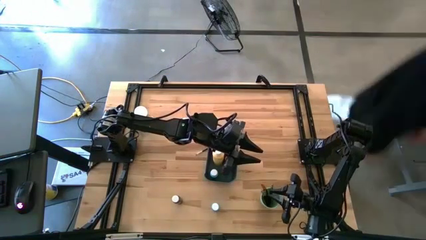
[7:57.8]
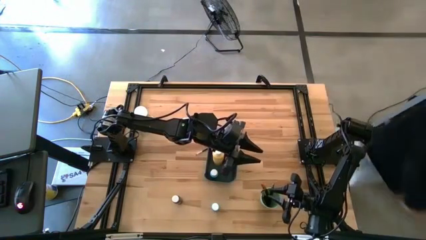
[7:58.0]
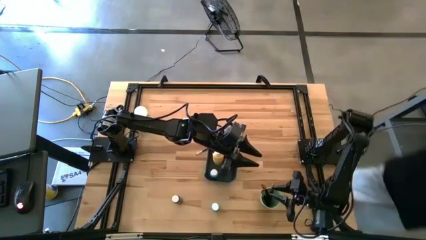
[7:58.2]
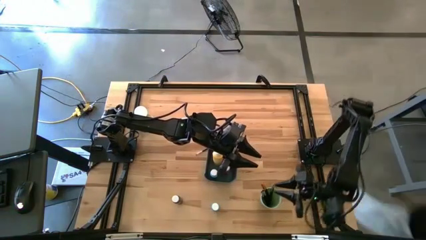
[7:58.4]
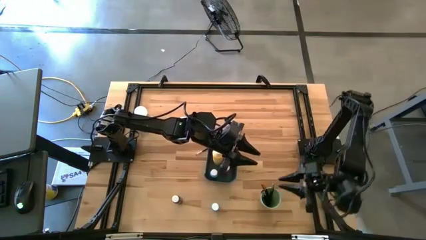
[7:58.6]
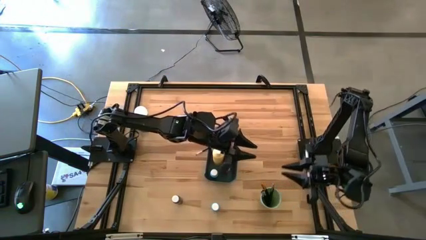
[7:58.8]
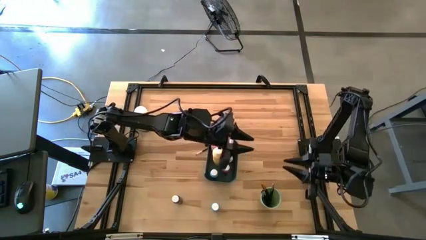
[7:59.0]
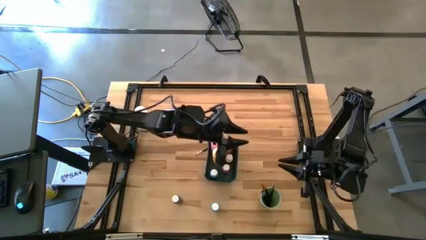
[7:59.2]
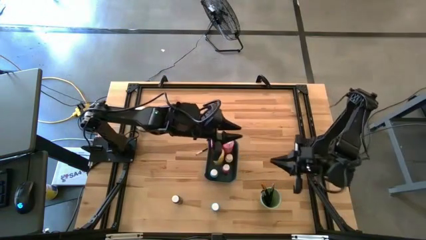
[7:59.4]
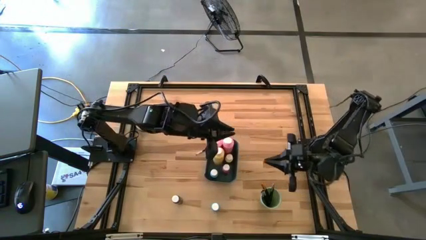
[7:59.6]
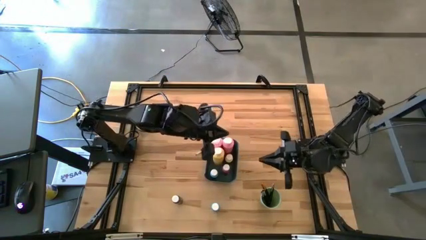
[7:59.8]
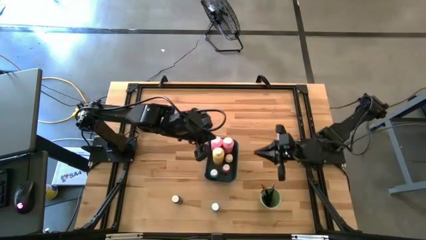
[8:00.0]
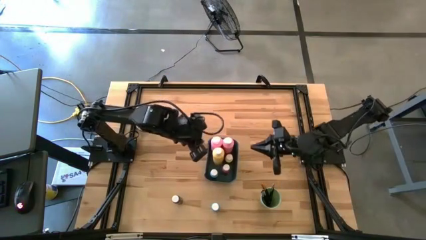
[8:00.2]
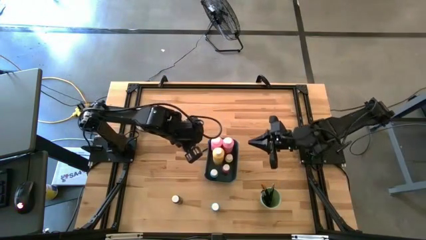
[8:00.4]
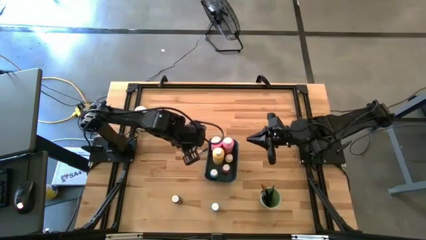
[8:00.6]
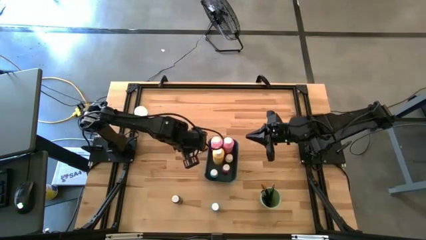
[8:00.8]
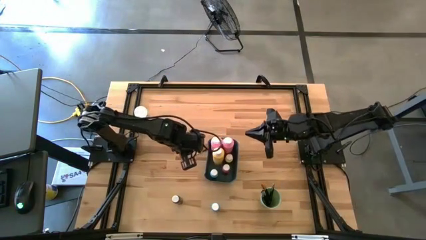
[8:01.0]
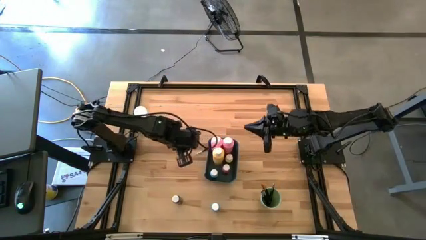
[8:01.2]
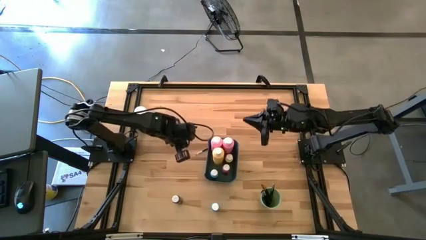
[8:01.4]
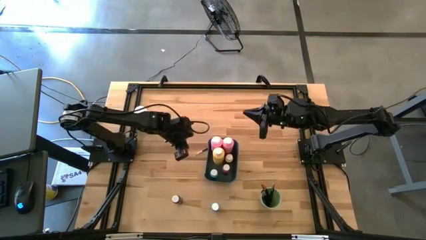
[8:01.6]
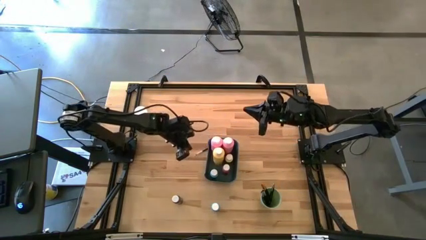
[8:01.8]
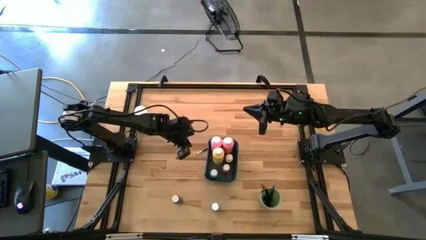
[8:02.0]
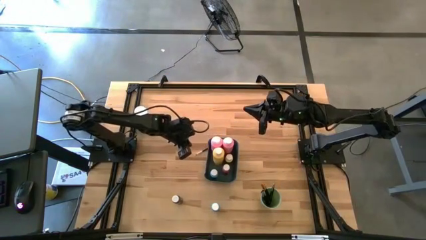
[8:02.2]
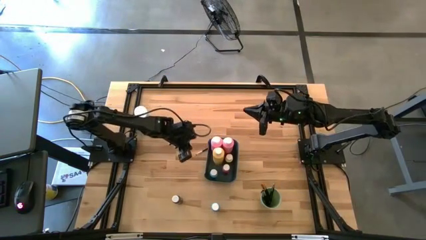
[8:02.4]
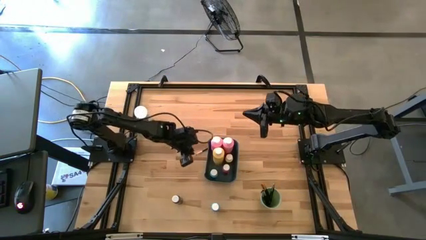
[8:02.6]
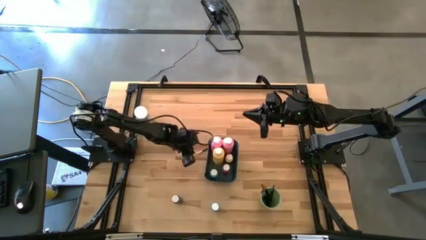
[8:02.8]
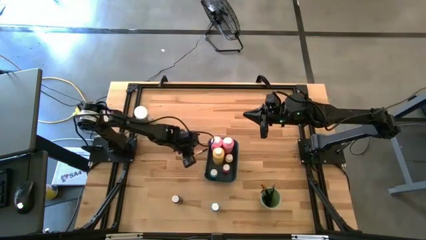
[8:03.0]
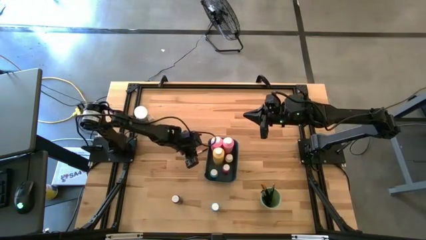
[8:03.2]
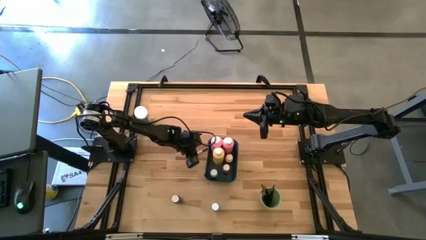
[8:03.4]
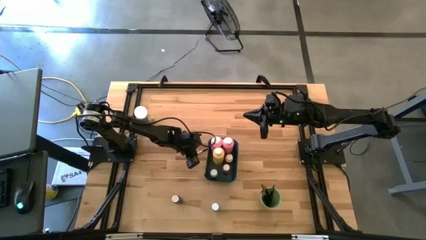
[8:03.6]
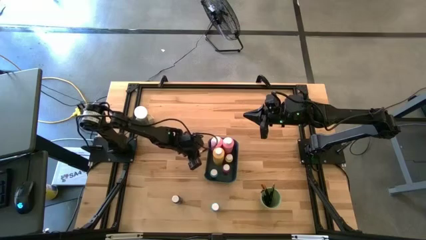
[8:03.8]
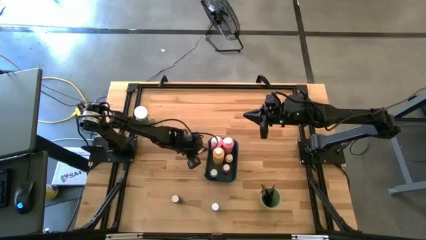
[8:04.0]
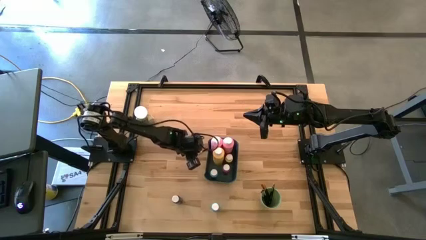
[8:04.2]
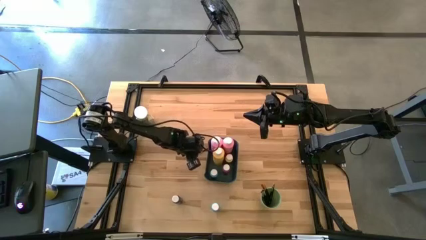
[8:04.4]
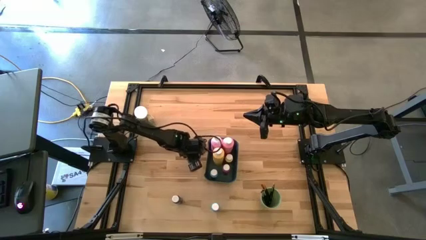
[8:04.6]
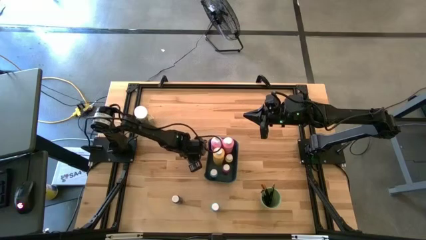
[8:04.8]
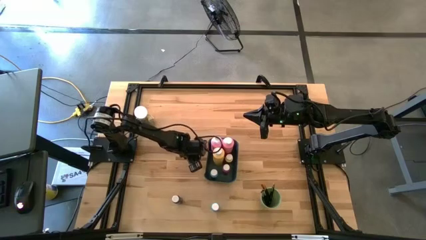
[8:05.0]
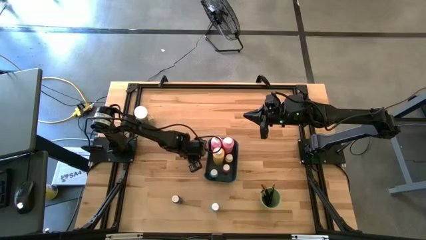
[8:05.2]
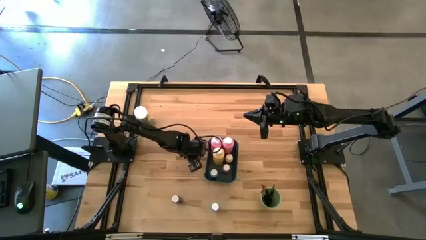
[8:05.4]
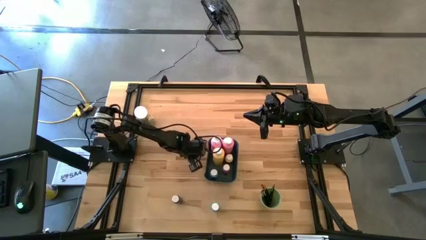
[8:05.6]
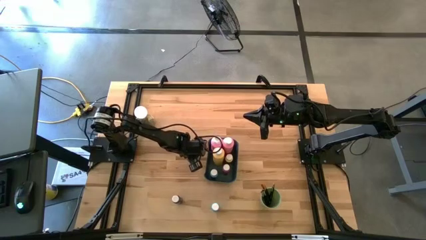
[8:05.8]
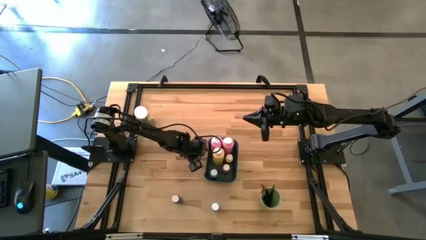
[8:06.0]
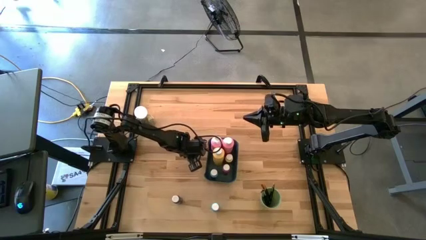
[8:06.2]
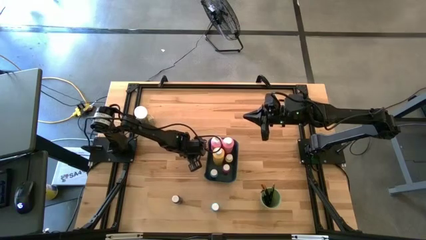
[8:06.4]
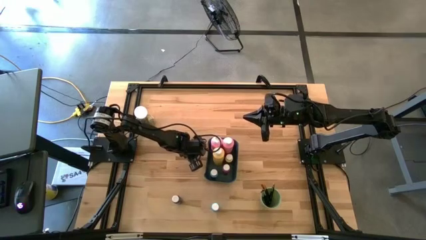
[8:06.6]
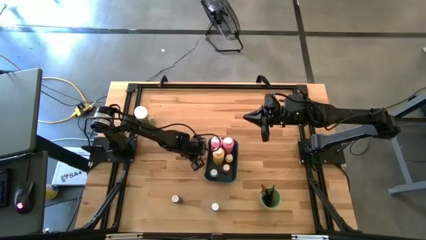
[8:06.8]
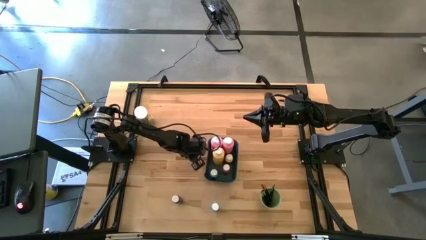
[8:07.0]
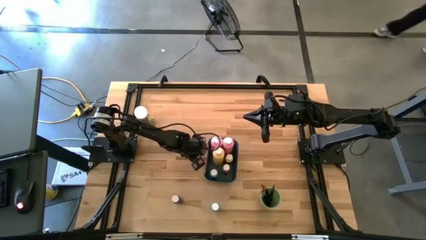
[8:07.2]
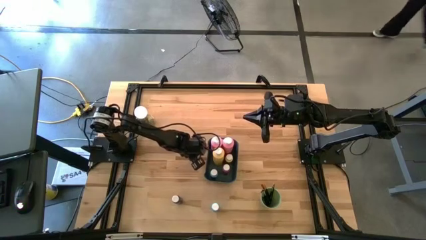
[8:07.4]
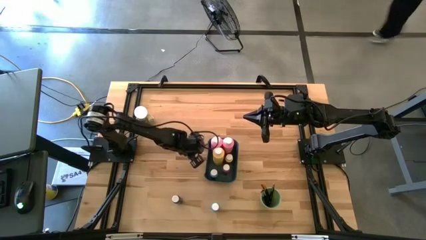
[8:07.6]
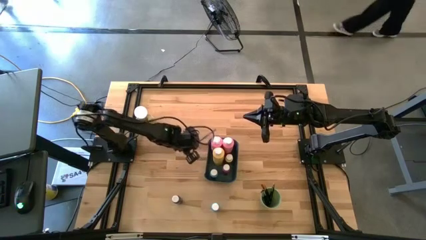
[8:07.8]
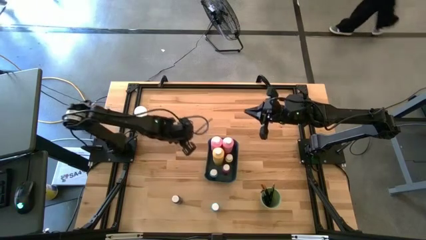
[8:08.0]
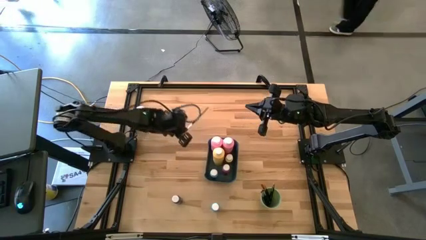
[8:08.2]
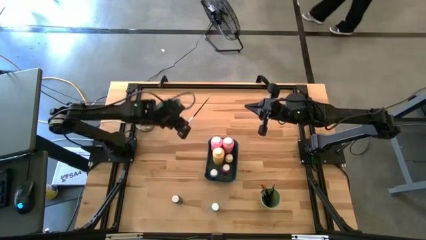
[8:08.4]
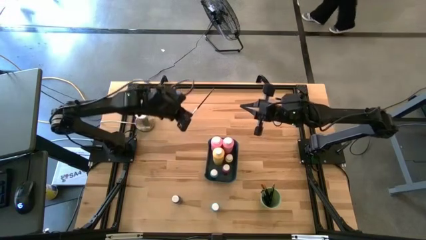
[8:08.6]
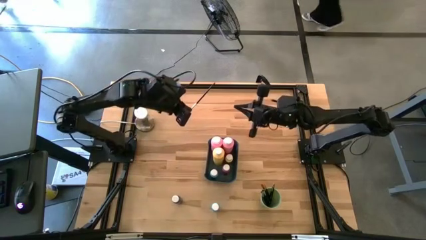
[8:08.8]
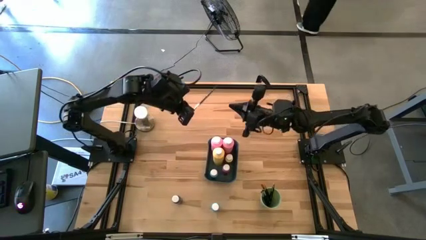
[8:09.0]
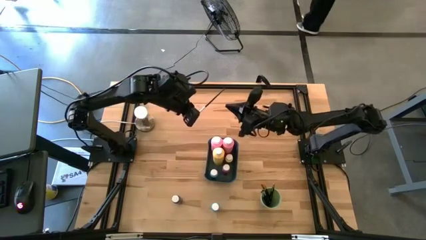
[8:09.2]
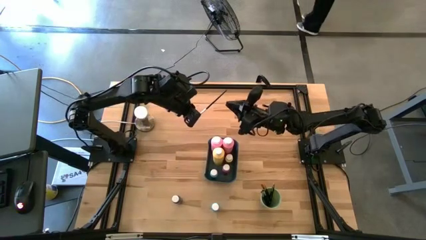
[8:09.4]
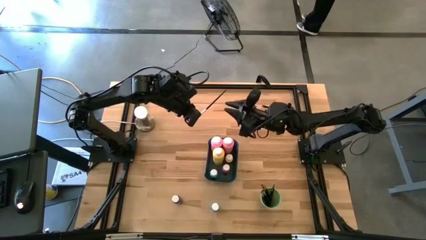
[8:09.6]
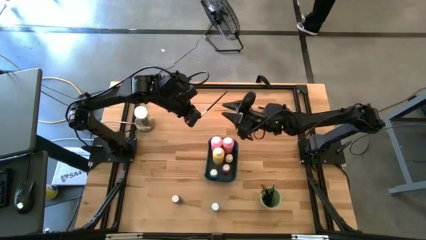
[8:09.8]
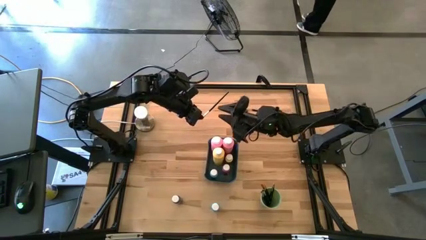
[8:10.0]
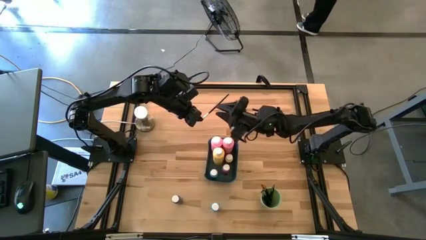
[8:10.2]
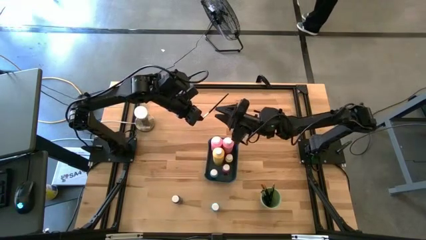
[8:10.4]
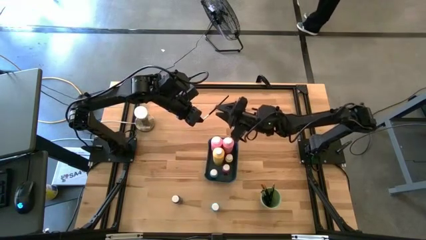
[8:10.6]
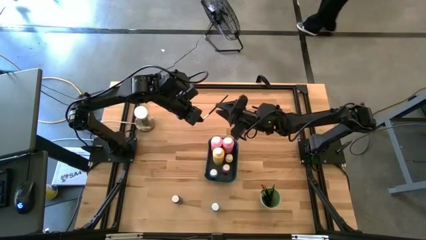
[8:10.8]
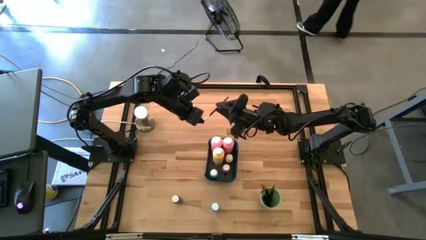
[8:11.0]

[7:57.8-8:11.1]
Task: Pick & Place Paint Supplies
Put the black and silver paint brush into the green cup
